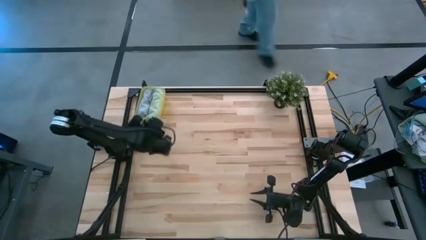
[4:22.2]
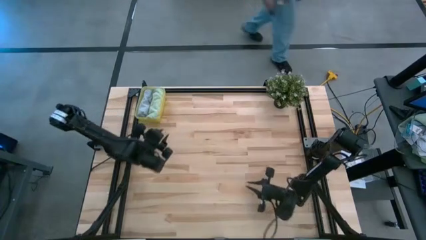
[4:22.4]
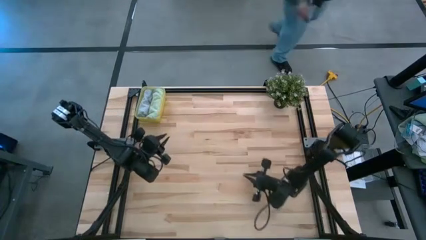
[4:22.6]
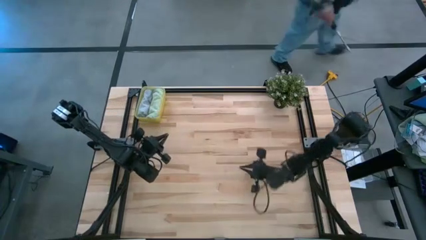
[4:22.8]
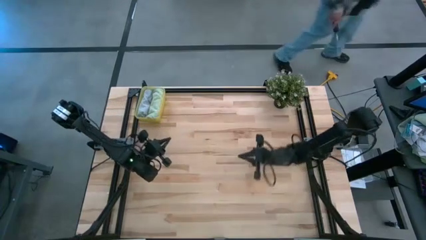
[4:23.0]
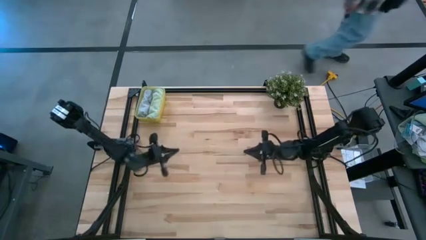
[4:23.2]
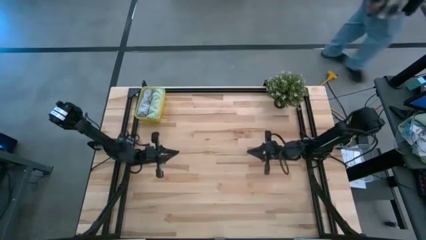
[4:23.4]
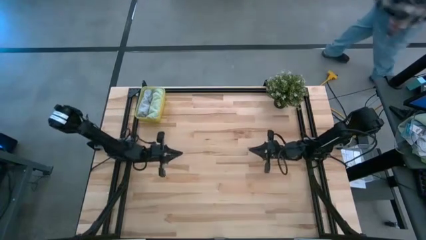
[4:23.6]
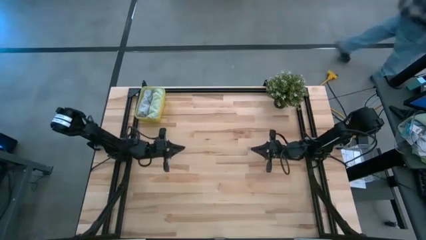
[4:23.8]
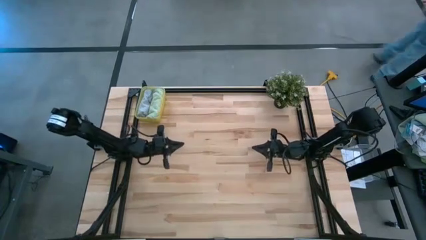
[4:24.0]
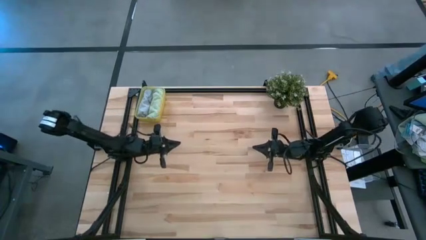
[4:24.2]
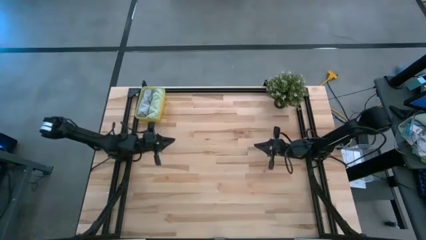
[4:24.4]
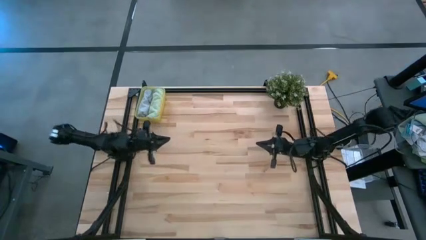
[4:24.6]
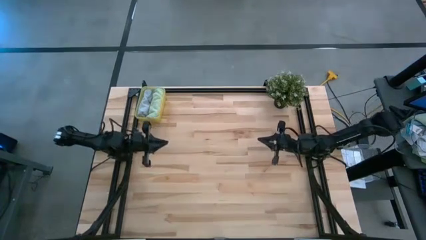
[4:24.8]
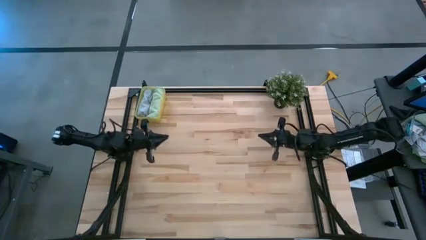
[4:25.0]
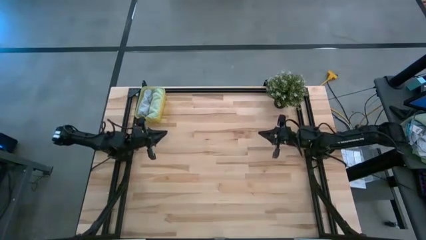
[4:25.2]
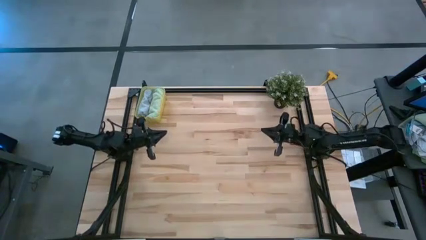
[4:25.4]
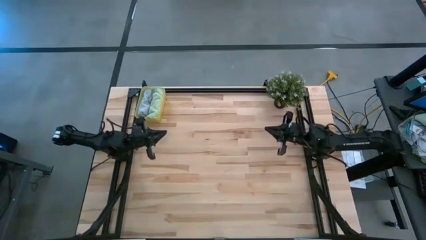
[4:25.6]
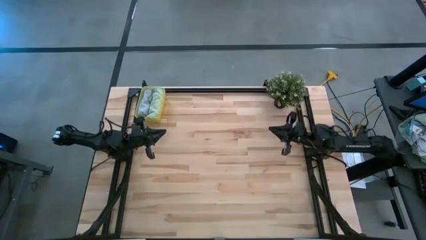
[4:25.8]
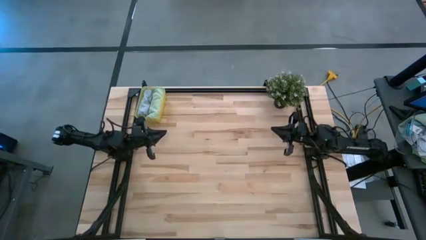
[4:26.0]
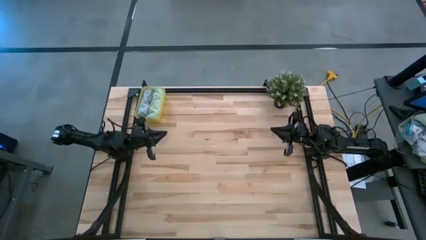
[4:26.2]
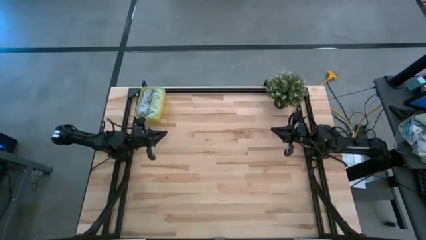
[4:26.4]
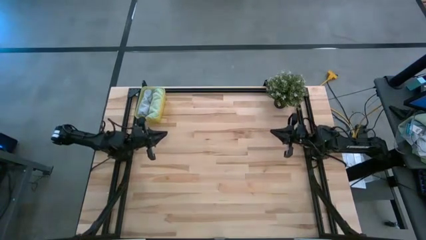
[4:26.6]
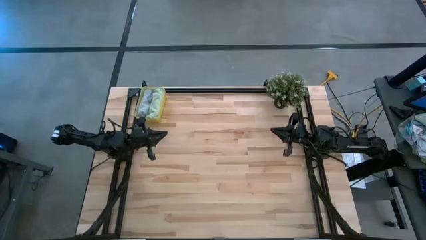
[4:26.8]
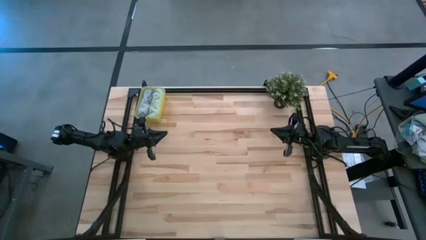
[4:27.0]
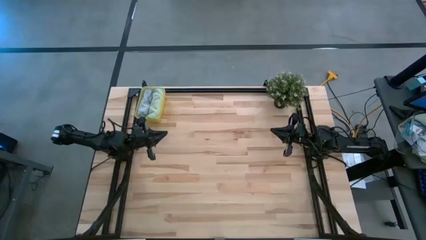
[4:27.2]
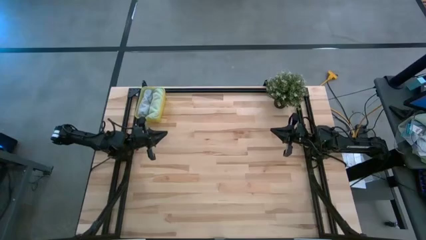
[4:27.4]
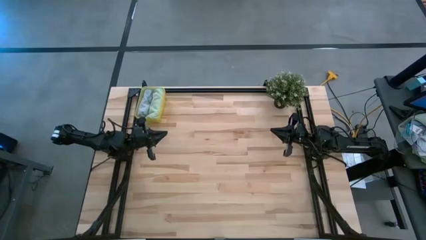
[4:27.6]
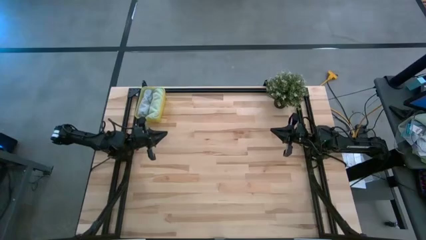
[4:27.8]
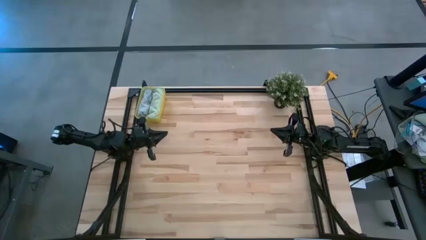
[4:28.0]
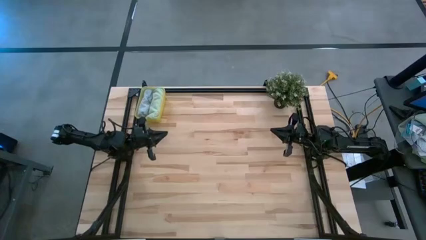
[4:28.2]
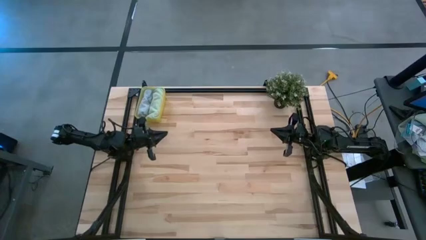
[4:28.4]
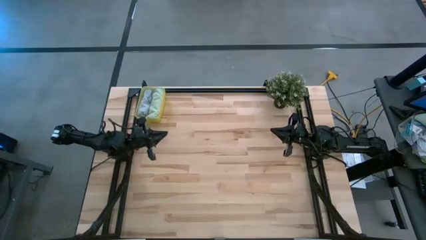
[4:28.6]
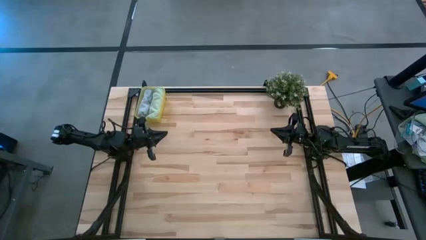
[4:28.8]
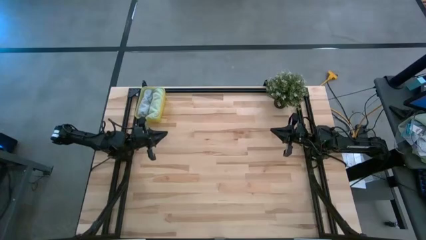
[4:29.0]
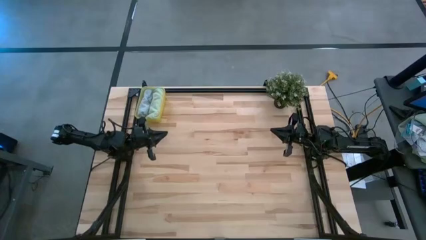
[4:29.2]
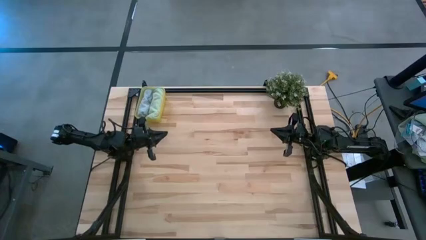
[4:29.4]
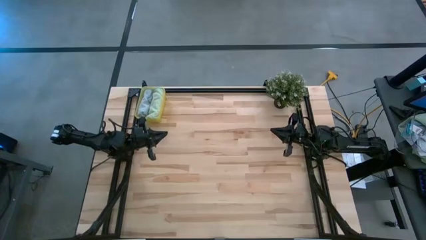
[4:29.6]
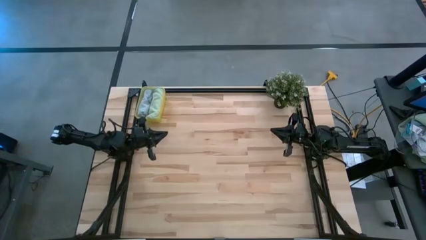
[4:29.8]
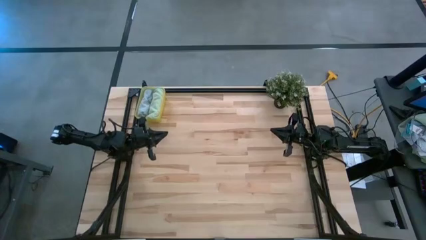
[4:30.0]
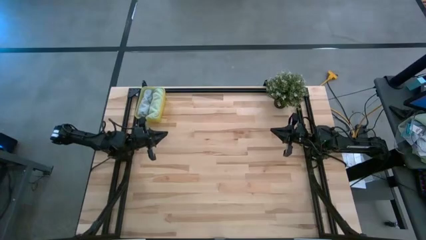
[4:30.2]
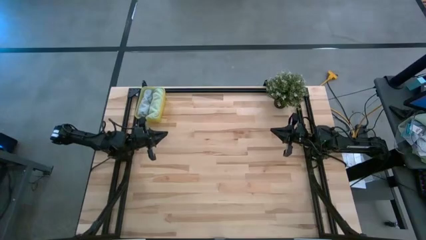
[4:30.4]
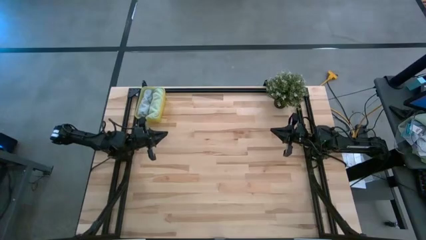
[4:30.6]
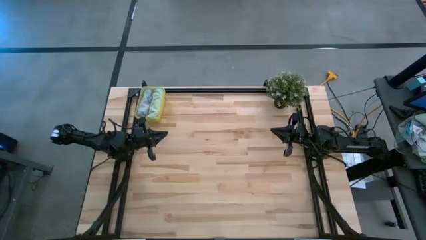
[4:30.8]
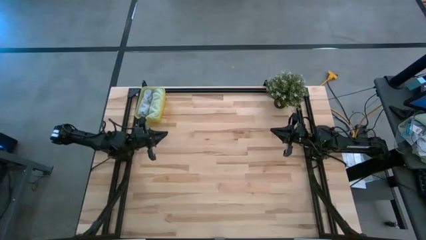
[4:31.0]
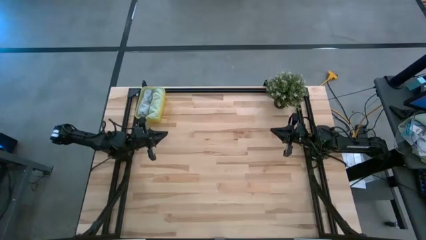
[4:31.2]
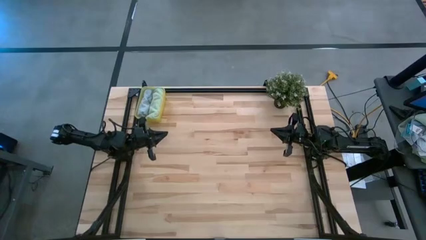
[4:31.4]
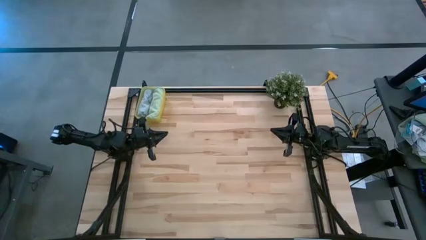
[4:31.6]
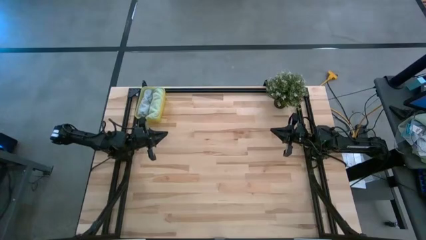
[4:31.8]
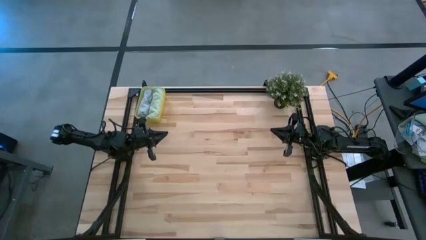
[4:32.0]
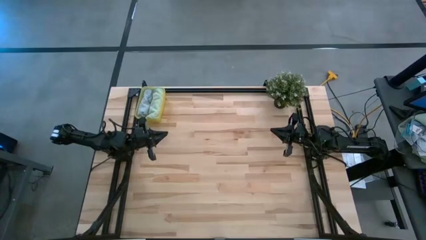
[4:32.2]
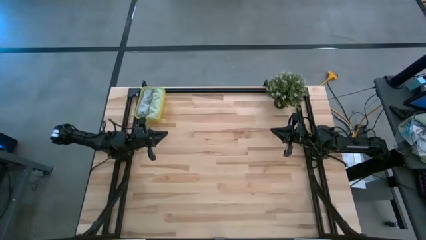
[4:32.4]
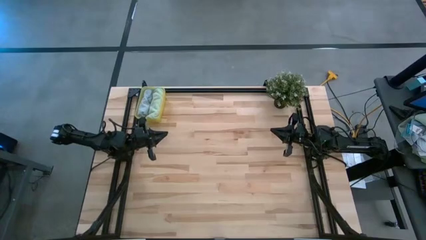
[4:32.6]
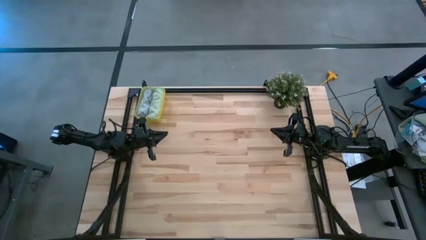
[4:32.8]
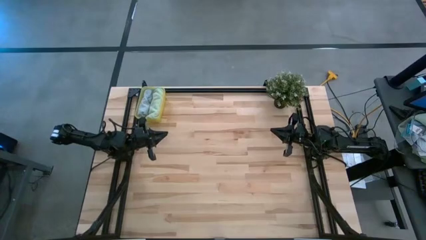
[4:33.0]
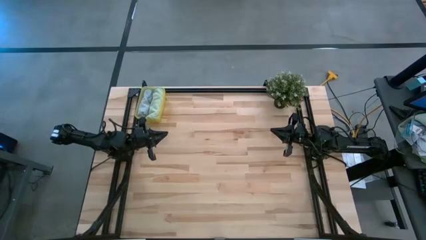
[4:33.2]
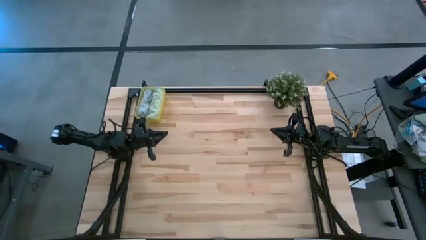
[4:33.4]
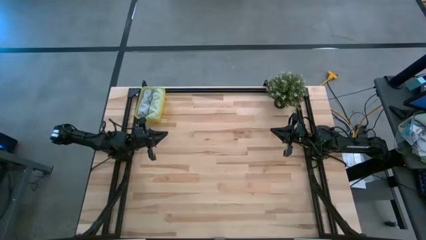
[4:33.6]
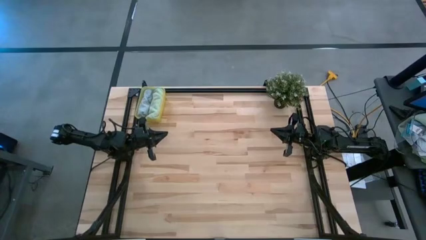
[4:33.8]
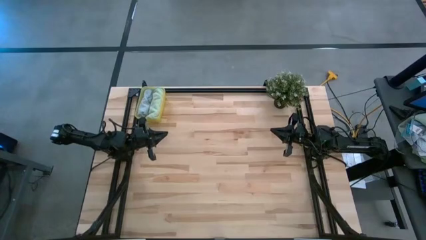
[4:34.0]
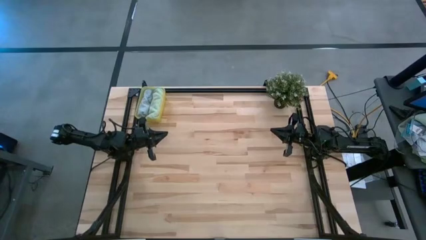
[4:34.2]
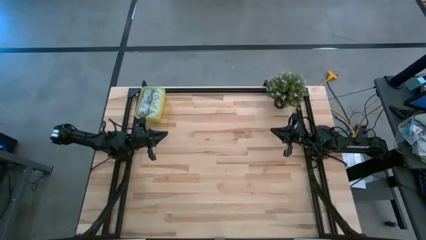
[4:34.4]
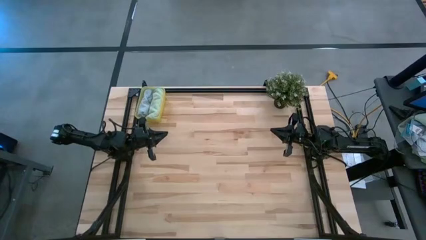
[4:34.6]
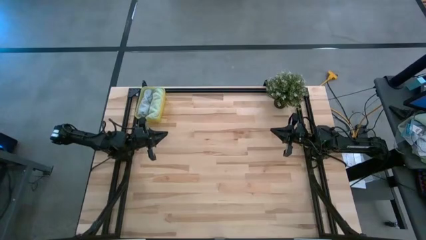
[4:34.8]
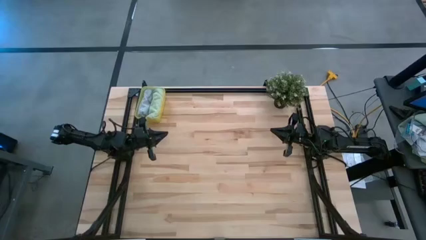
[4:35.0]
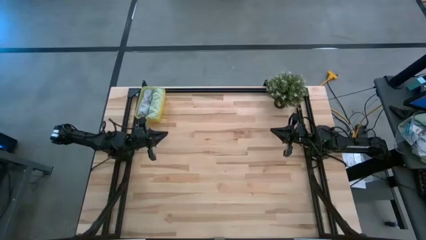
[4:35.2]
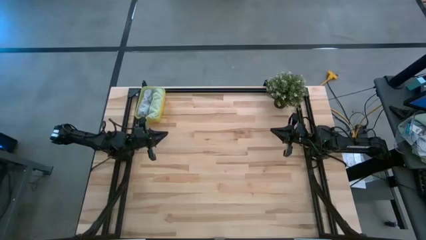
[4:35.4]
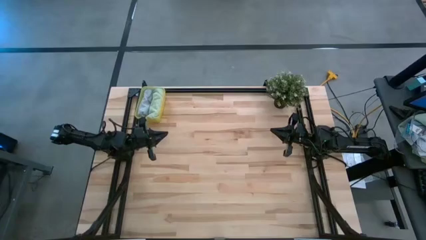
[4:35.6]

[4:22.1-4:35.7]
Task: Roll microfiber towels into tight, uniform cylinder then place into a basket
Return to Home Position

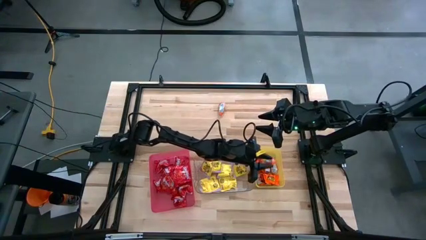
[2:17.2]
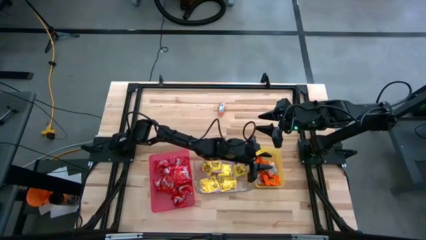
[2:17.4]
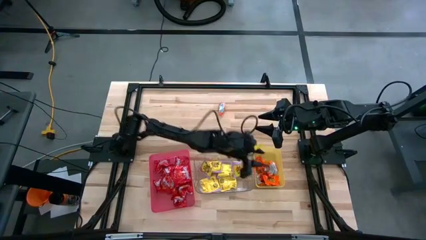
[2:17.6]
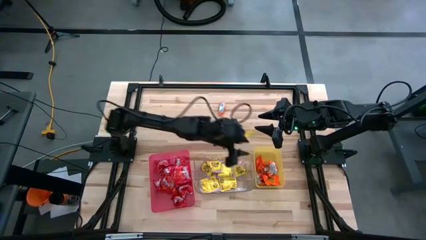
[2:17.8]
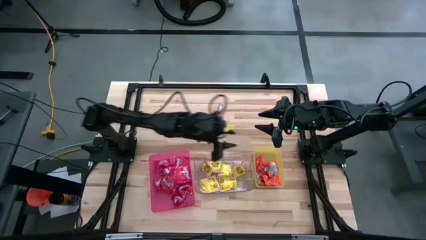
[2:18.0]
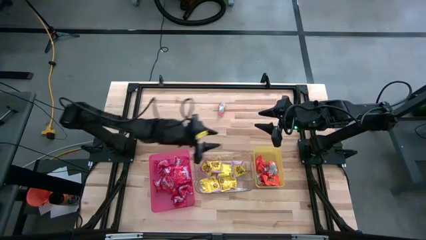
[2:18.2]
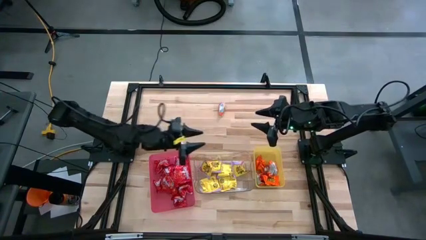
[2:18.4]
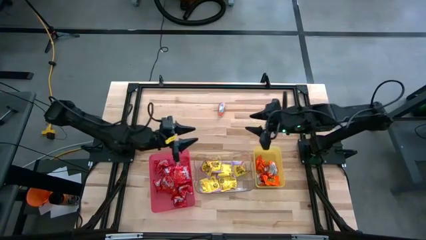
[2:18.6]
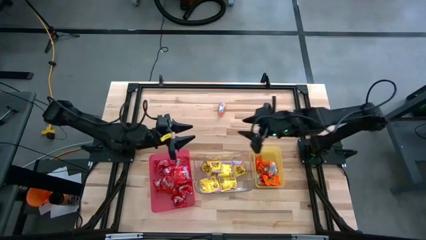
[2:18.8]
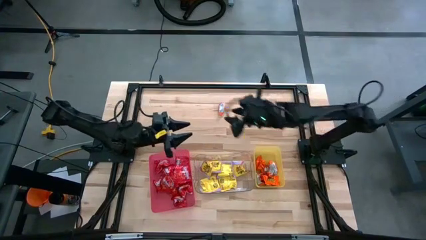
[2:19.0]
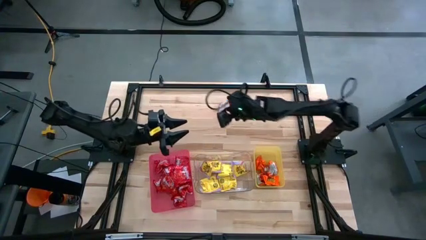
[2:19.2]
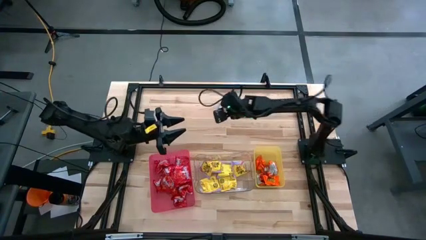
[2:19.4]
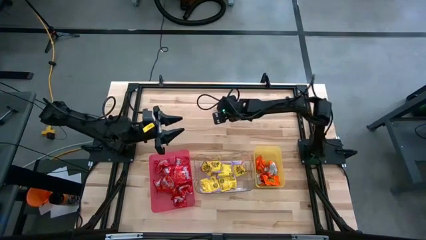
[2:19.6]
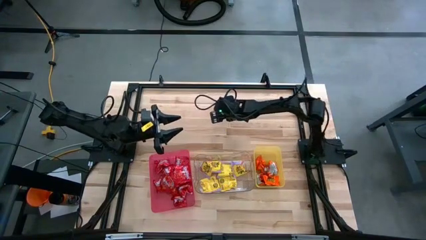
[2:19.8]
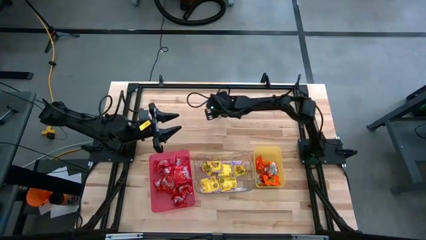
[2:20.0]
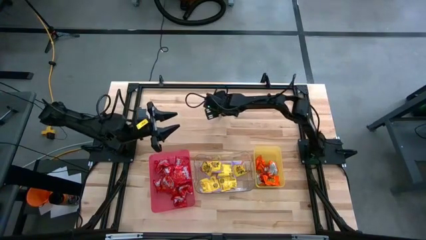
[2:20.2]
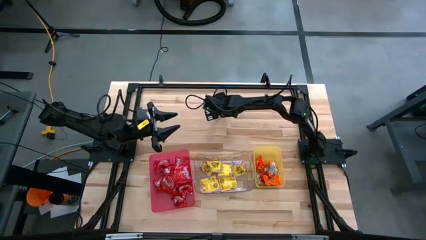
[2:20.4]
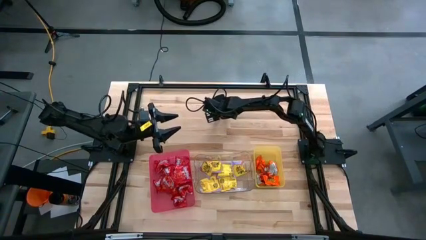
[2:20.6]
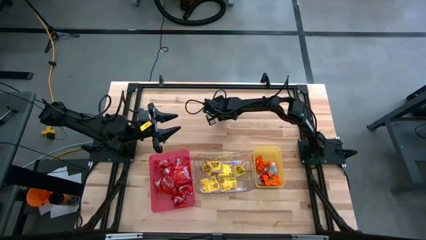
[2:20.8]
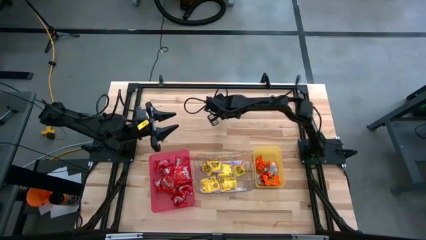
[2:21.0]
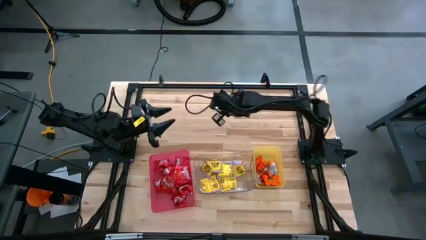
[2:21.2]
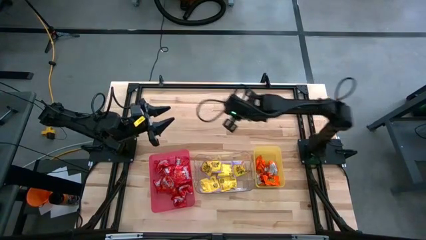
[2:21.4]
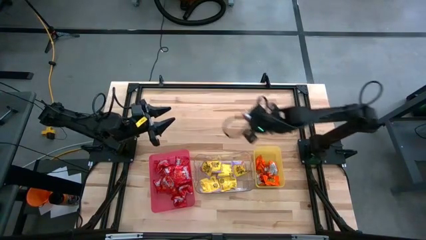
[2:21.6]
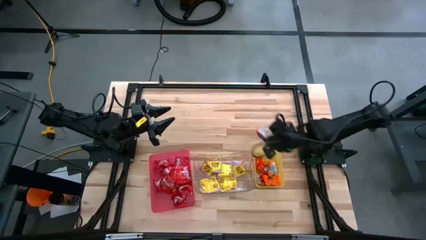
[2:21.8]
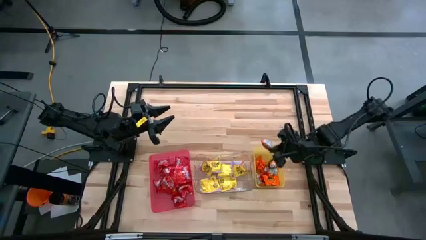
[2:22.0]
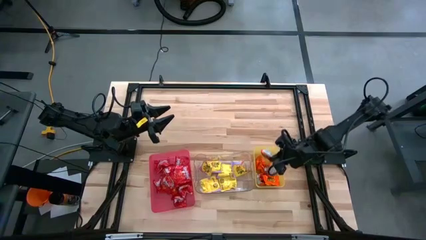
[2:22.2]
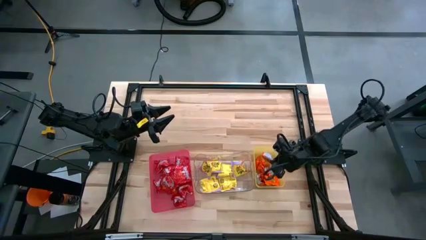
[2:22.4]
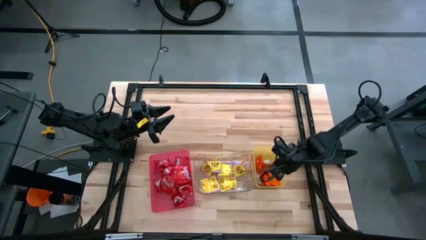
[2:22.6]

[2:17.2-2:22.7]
Task: Sort candy
Put the orange chocolate into the yellow bin
